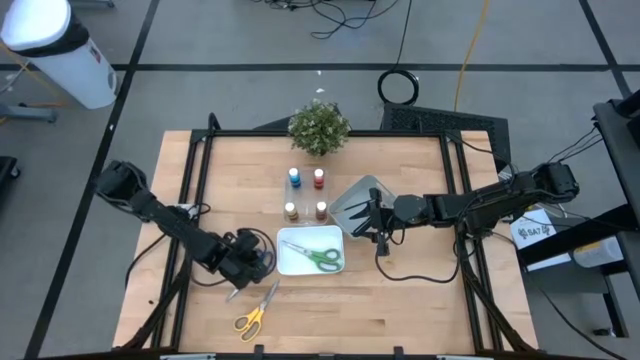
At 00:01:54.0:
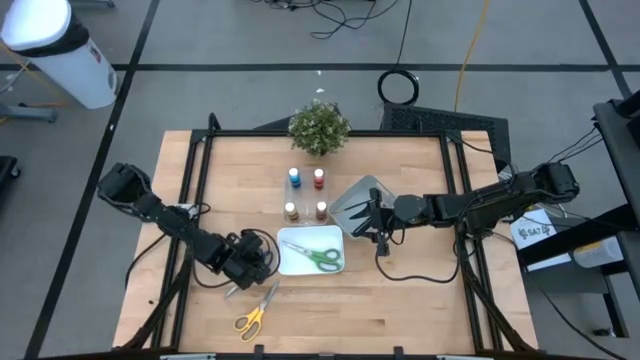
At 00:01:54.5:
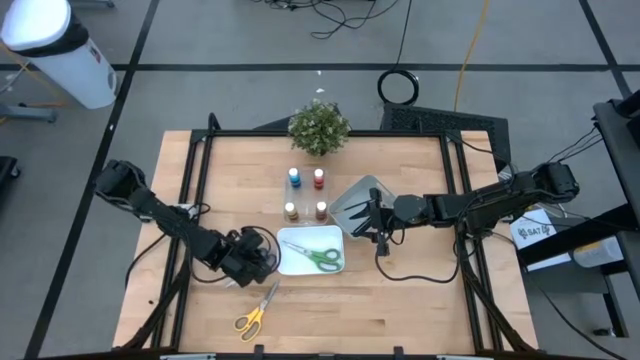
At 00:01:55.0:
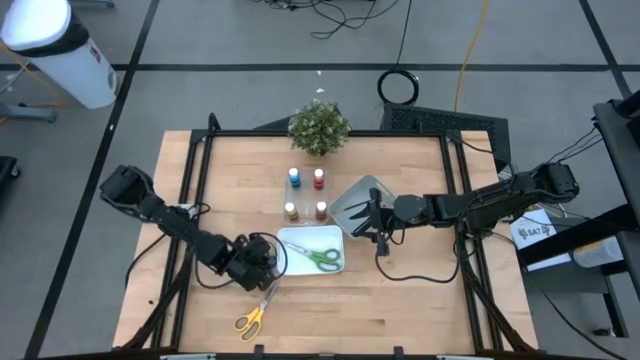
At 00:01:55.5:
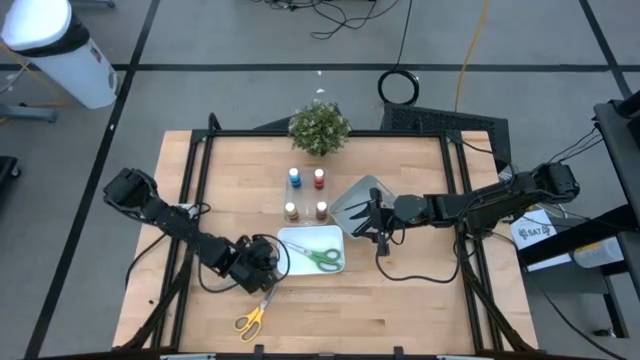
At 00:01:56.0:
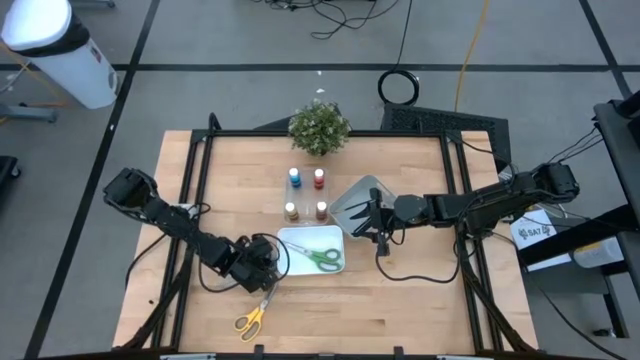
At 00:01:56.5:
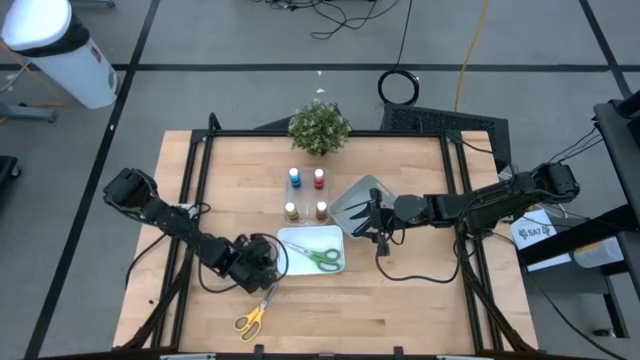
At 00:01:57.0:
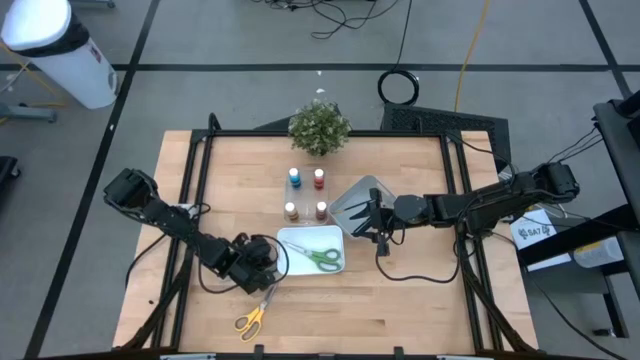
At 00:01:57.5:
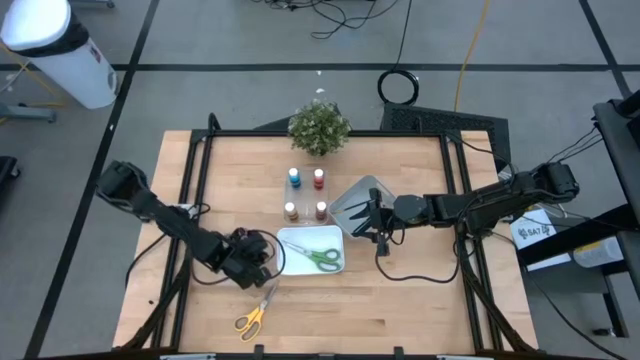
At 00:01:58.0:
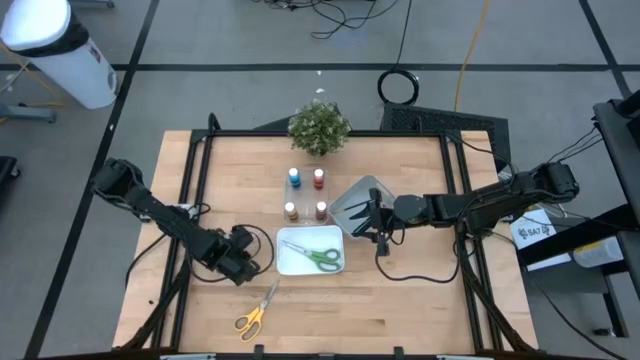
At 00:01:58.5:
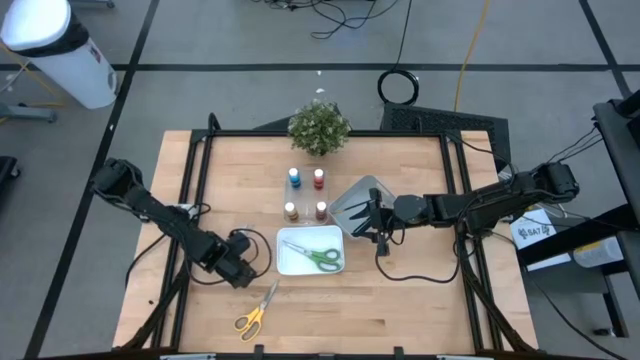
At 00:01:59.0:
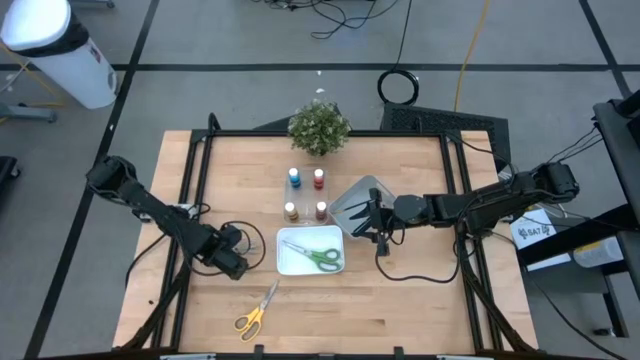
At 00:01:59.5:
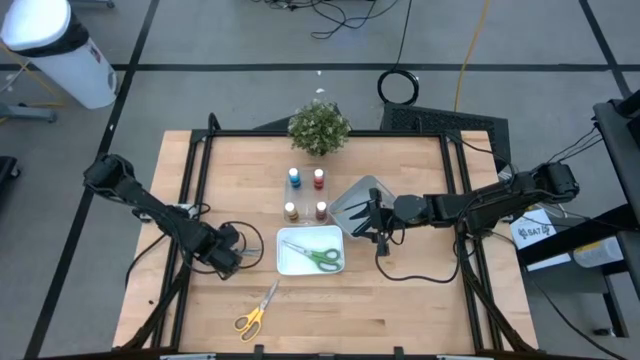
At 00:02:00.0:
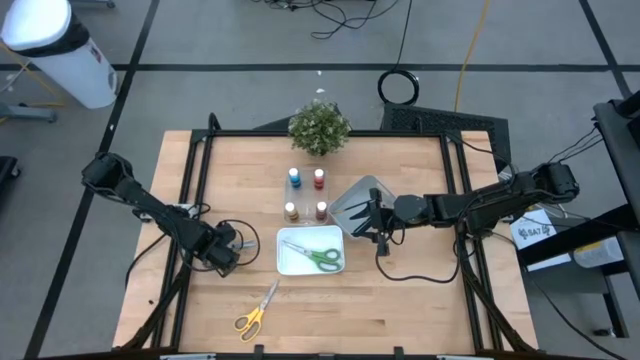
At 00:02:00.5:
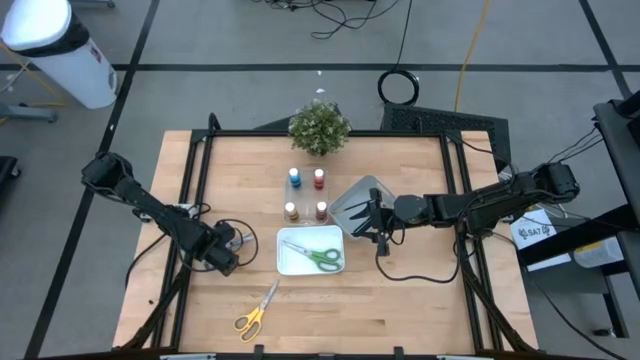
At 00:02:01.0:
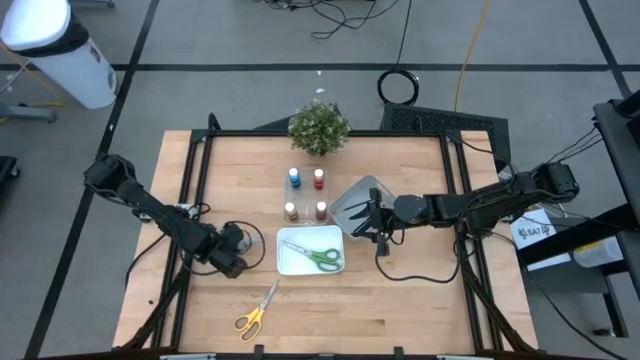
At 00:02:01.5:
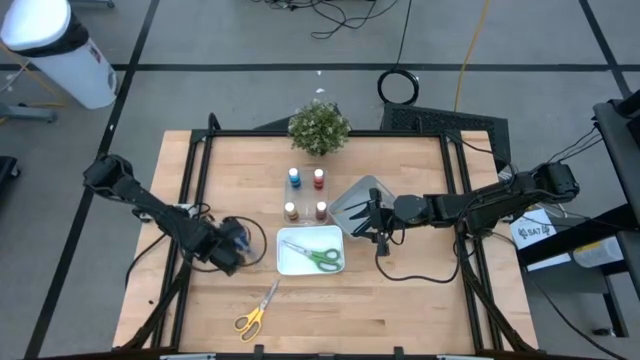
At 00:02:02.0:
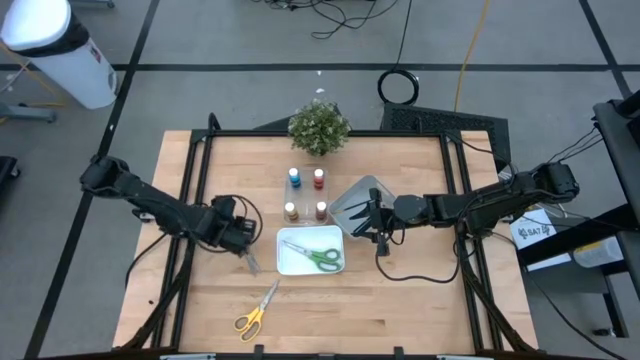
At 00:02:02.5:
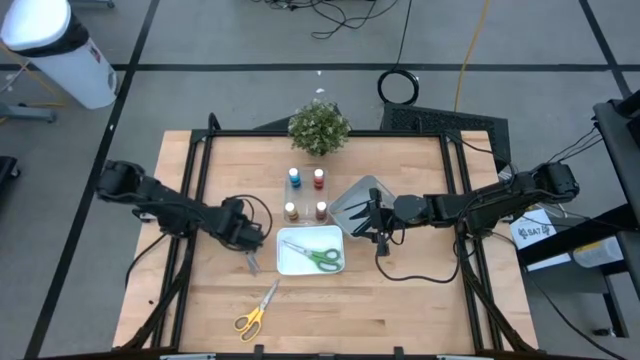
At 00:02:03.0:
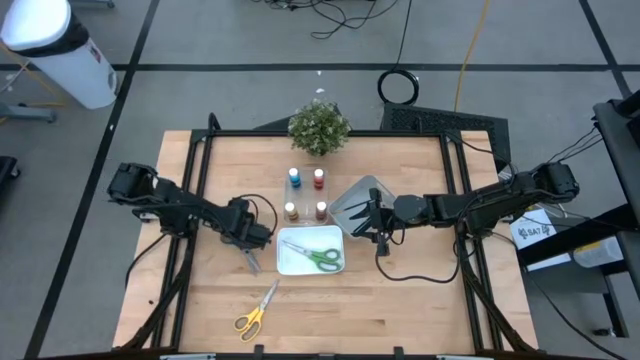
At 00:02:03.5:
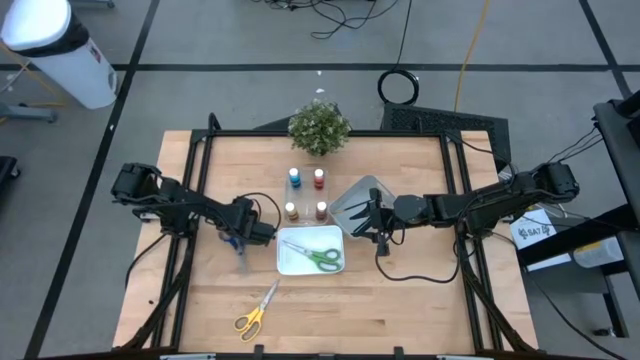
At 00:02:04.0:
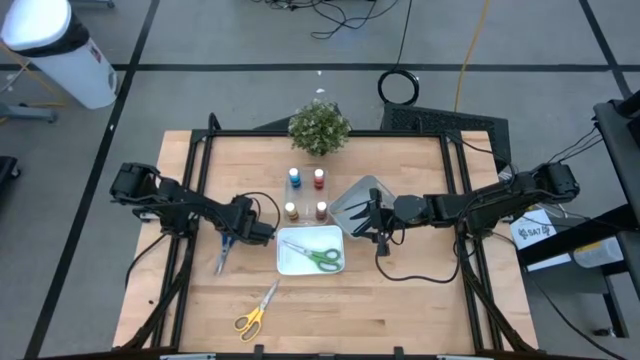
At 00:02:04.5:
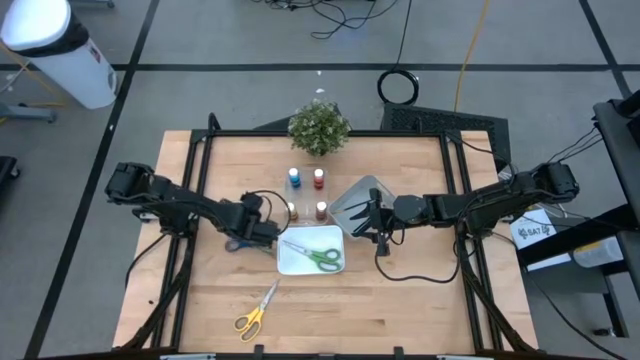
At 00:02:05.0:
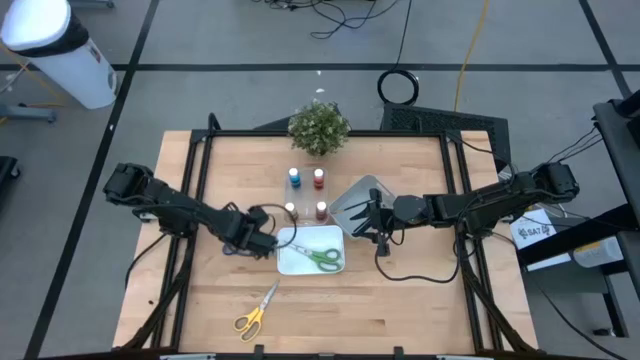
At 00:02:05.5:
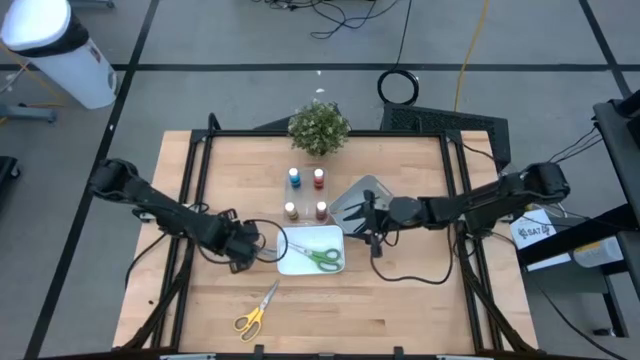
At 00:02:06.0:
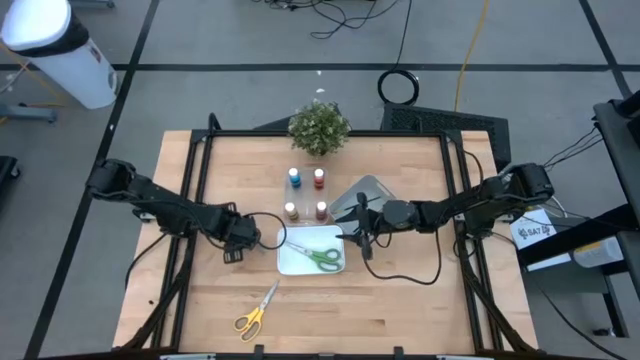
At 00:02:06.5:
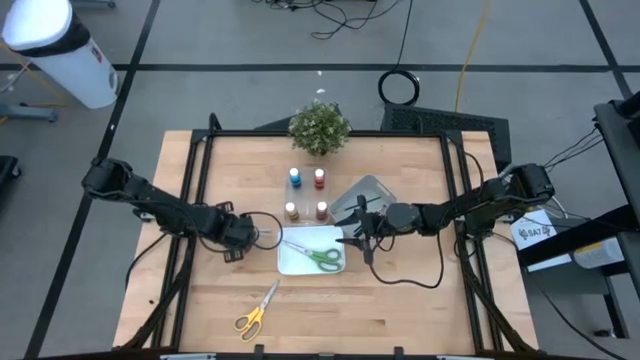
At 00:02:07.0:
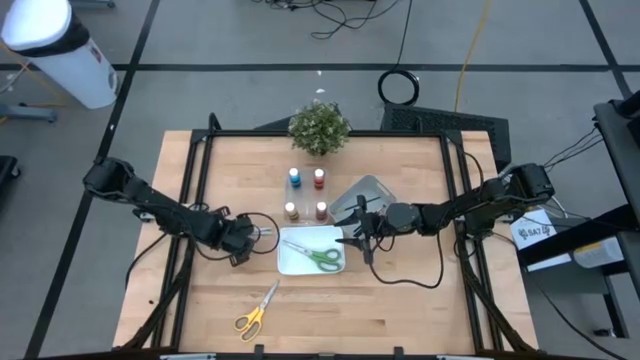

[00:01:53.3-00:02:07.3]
Task: Pick & Place Paint Supplies
Put the blue scissors into the white bin

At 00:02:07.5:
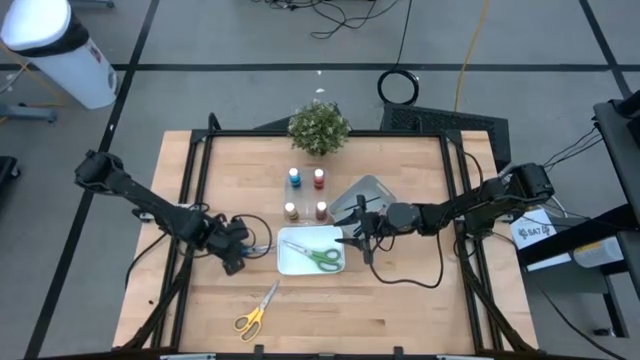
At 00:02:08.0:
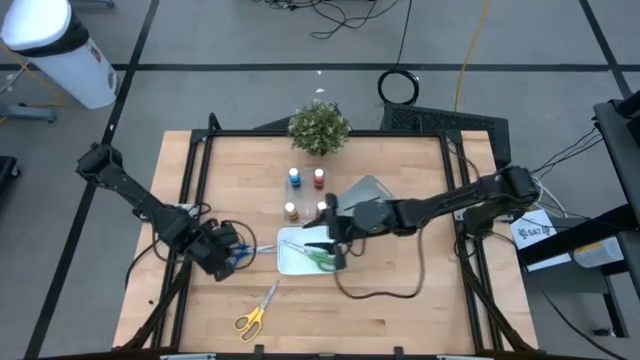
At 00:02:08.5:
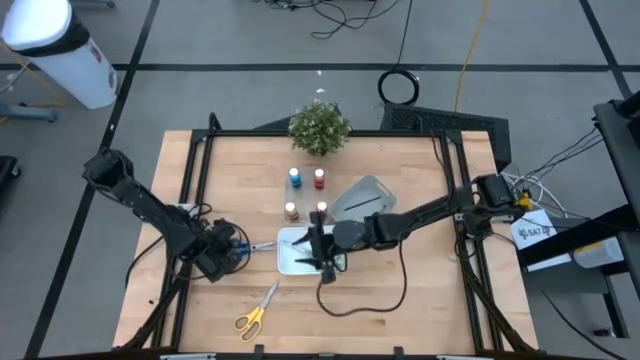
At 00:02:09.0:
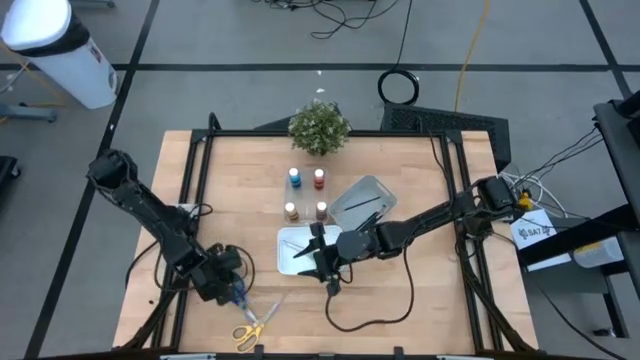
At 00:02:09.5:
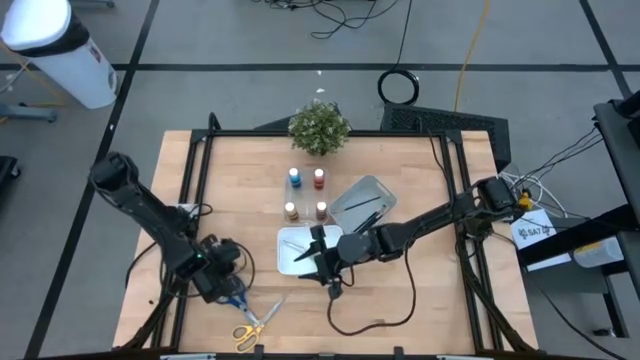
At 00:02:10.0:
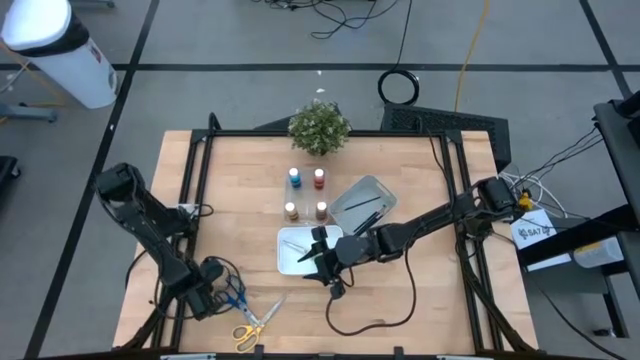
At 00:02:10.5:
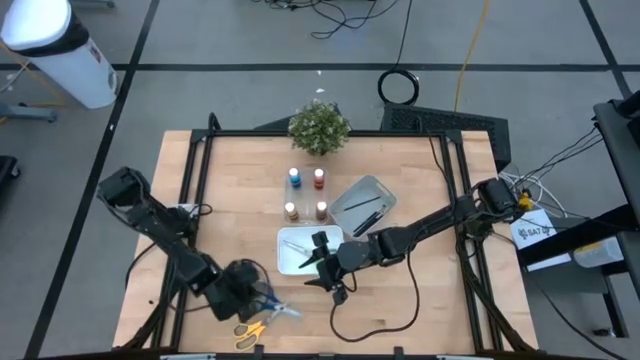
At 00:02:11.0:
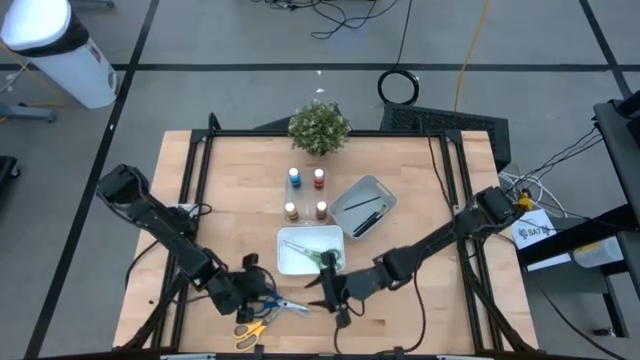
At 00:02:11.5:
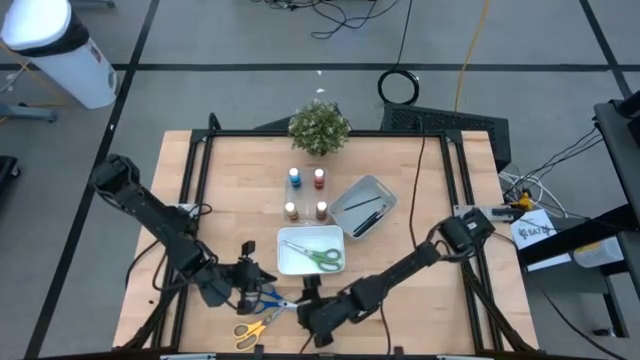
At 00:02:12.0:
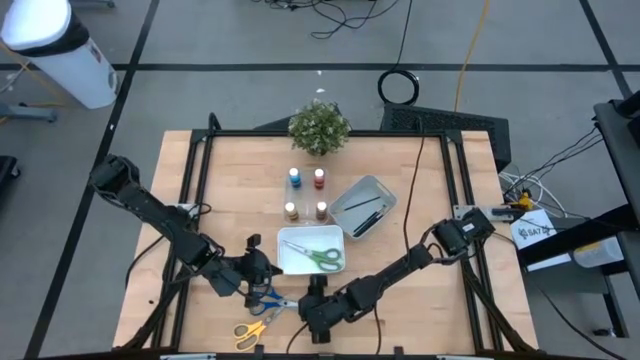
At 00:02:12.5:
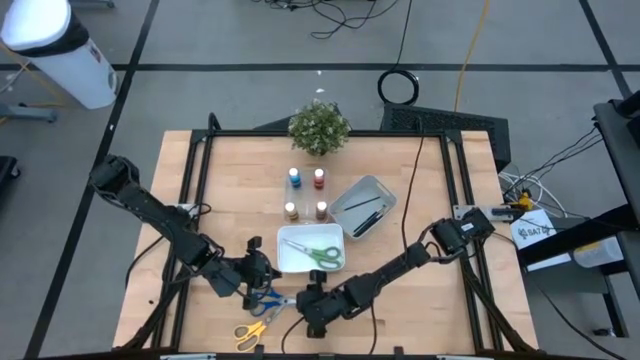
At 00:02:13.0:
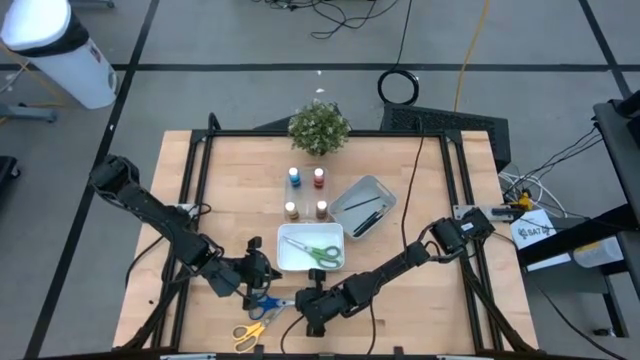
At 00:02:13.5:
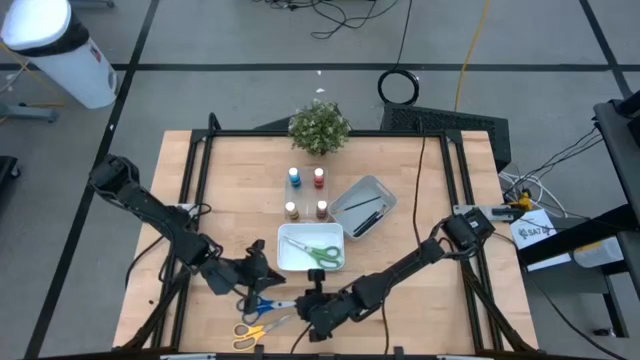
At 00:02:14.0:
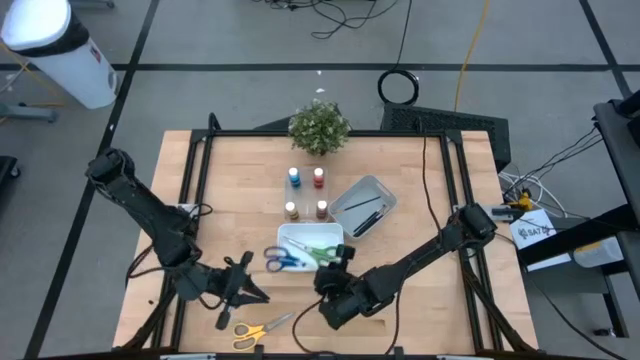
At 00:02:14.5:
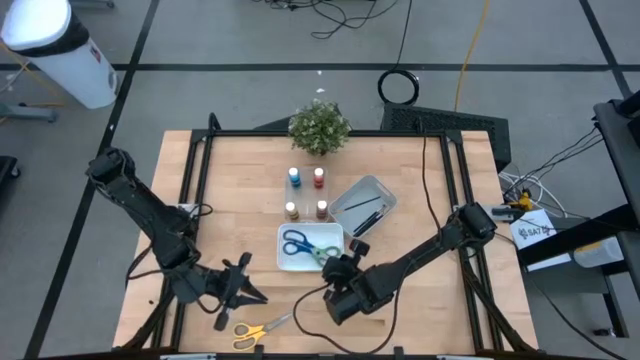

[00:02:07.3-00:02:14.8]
Put the blue scissors into the white bin
